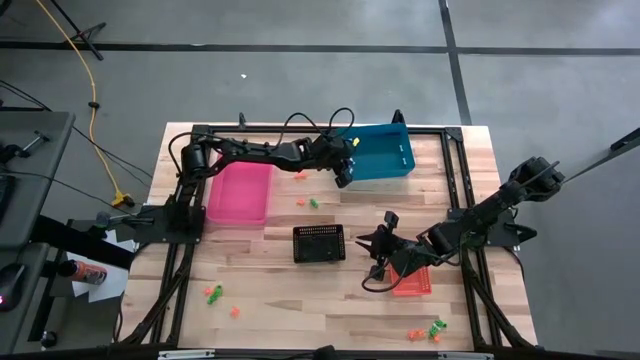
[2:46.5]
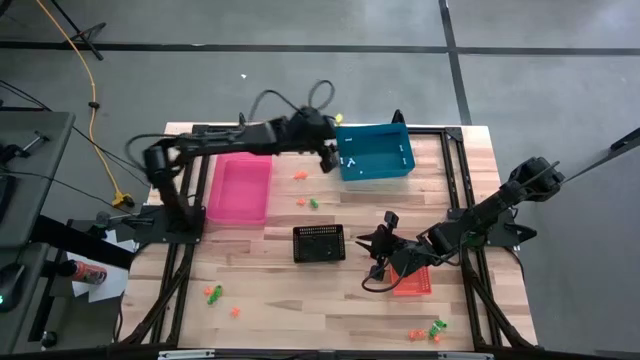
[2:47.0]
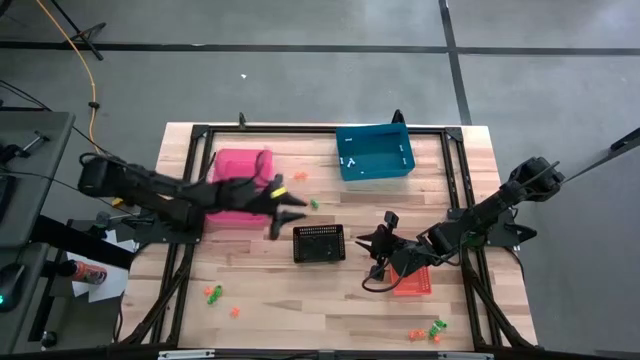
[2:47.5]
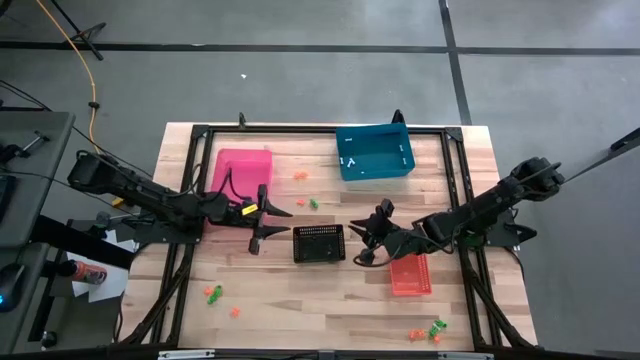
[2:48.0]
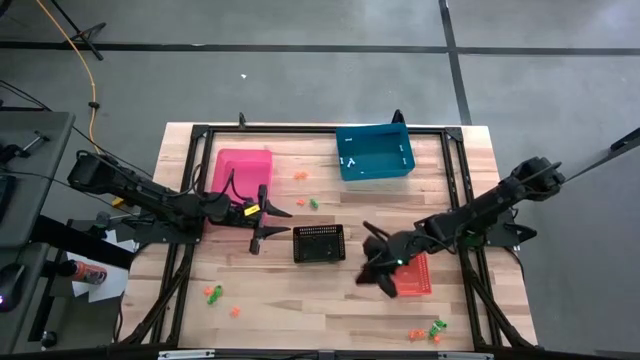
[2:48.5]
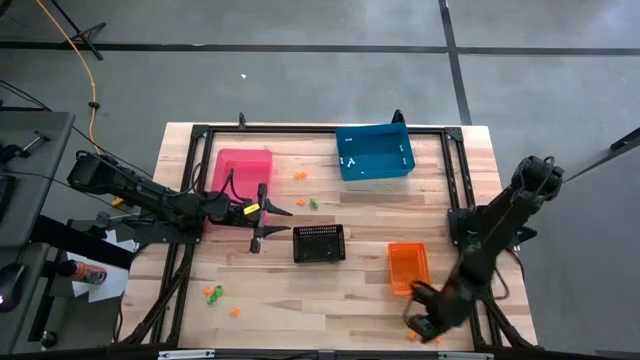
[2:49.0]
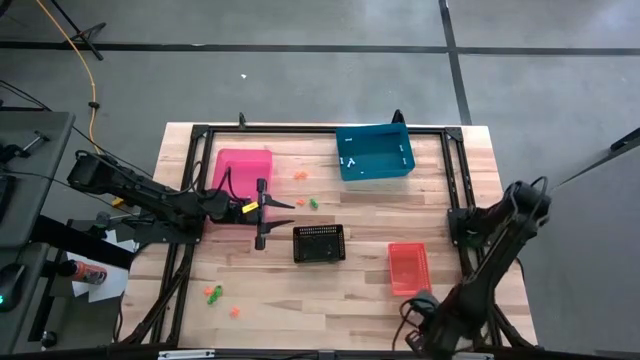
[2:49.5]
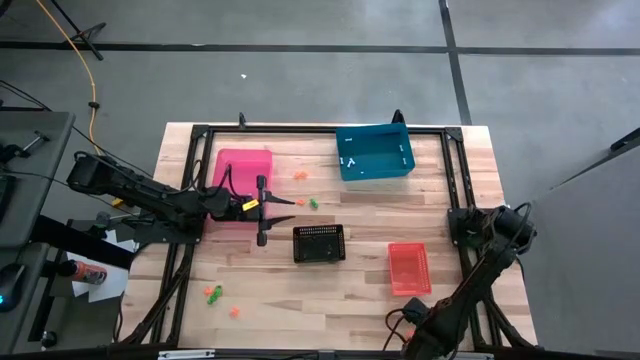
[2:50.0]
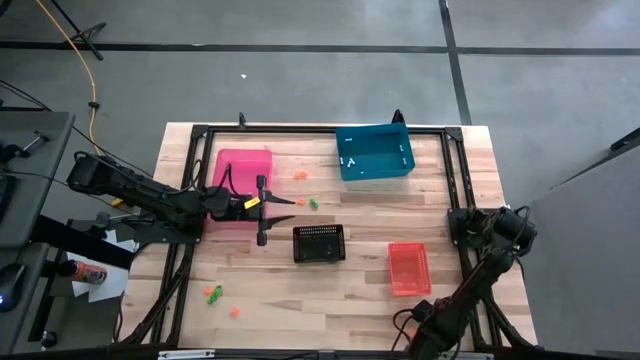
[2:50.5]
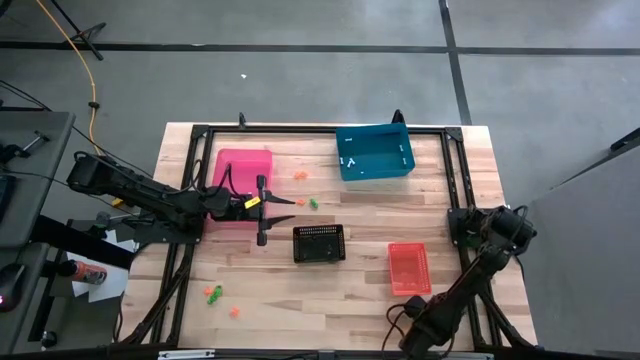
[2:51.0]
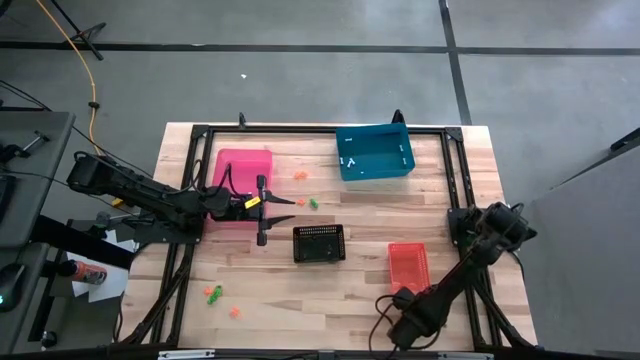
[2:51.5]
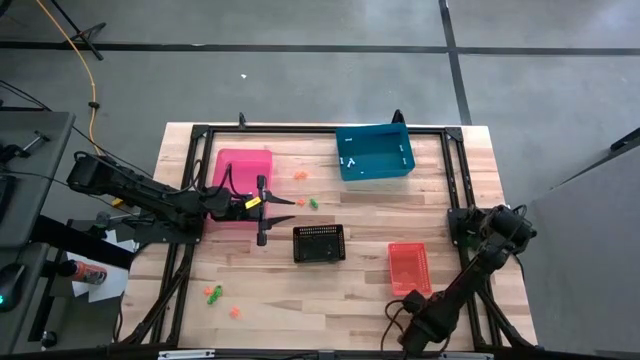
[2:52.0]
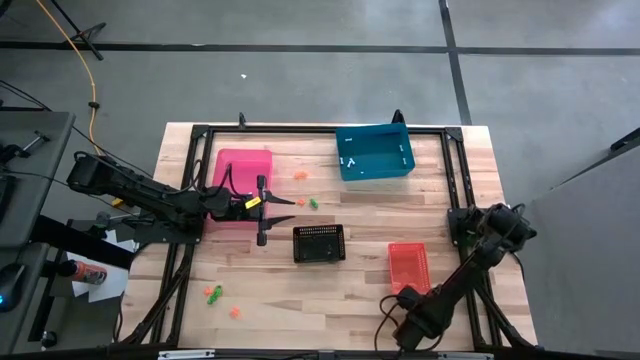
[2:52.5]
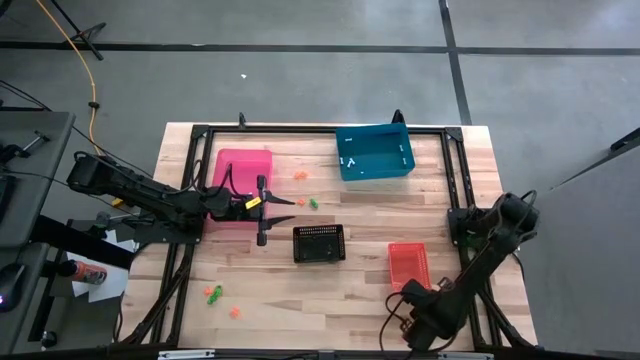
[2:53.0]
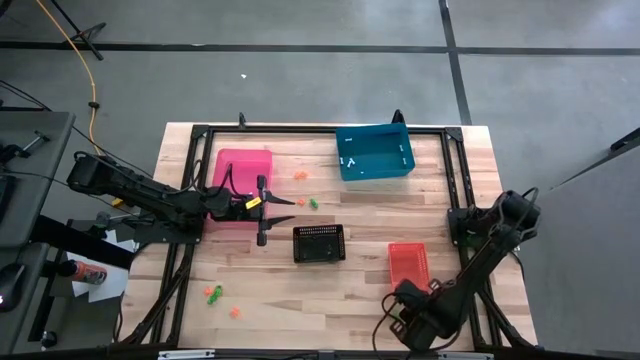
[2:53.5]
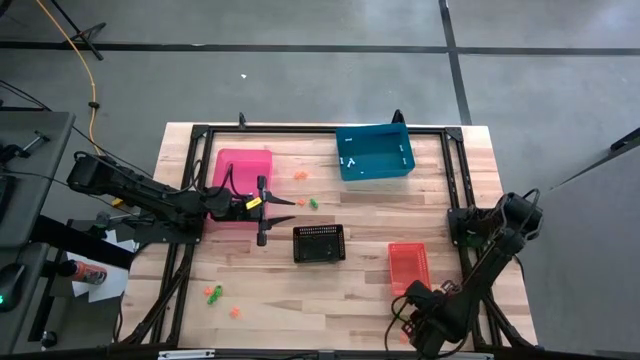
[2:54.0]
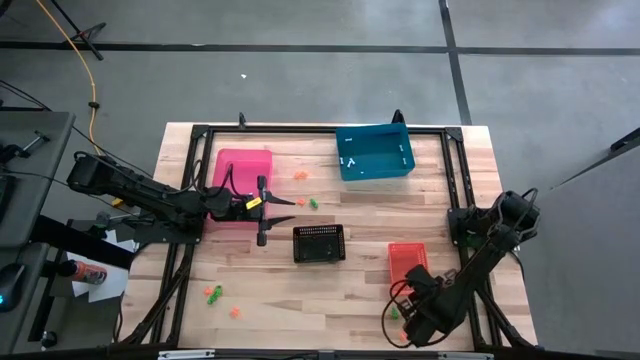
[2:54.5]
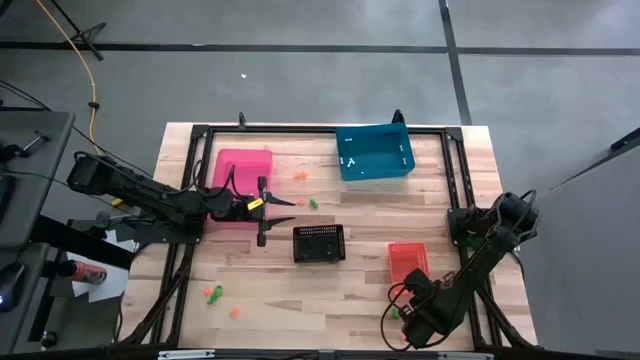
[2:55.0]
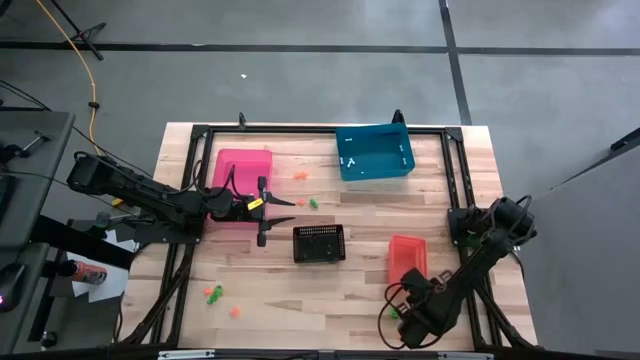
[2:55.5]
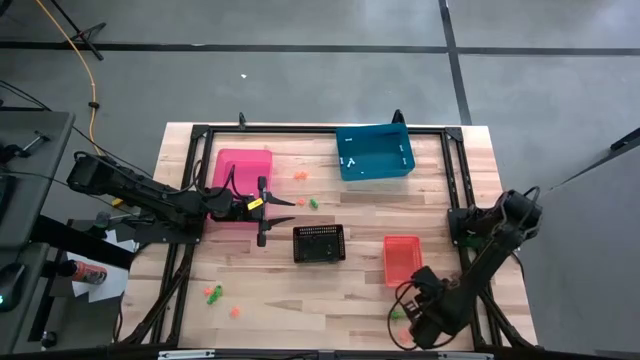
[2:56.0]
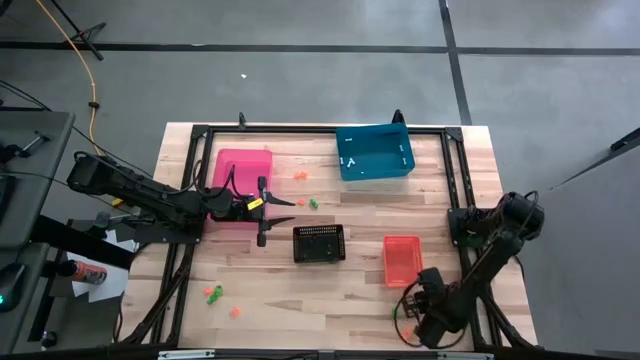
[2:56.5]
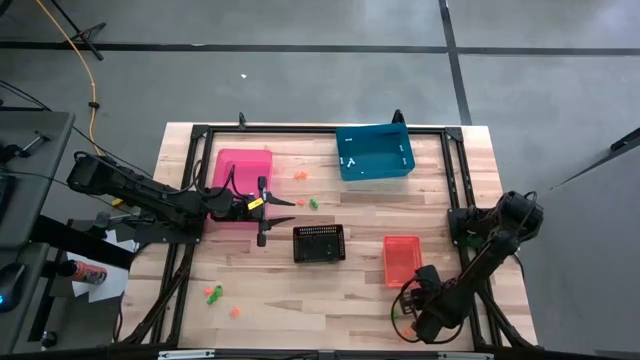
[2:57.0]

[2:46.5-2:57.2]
Task: Sort Halloween decoration
Put the white bone toy into the blue bin

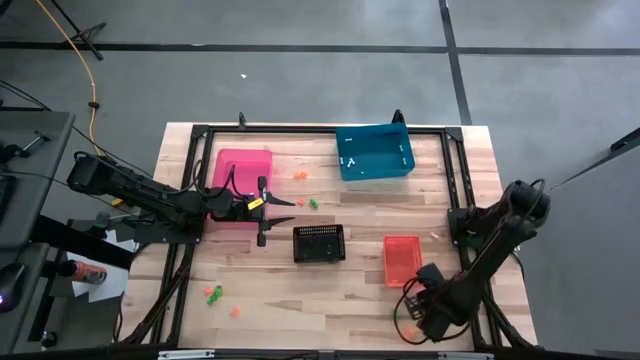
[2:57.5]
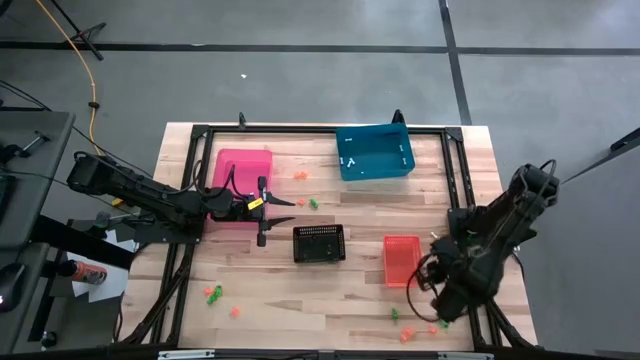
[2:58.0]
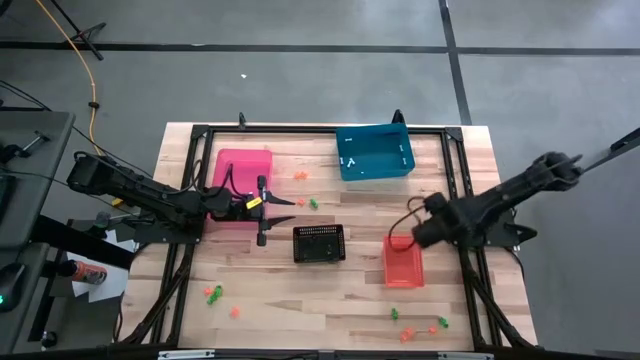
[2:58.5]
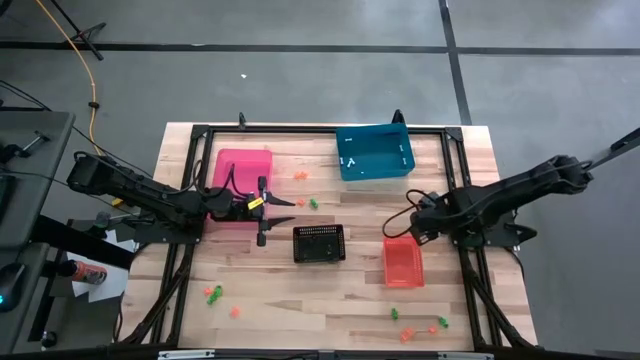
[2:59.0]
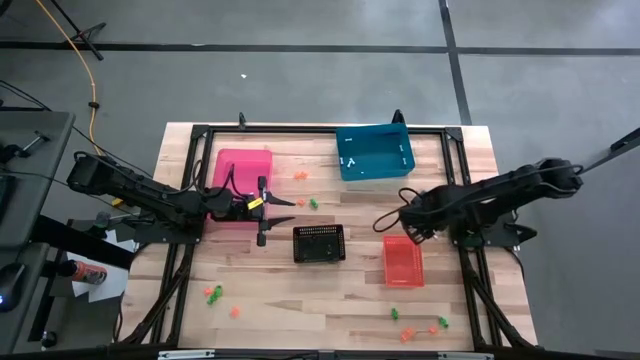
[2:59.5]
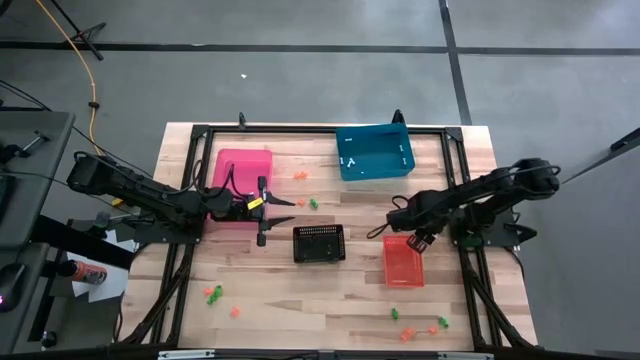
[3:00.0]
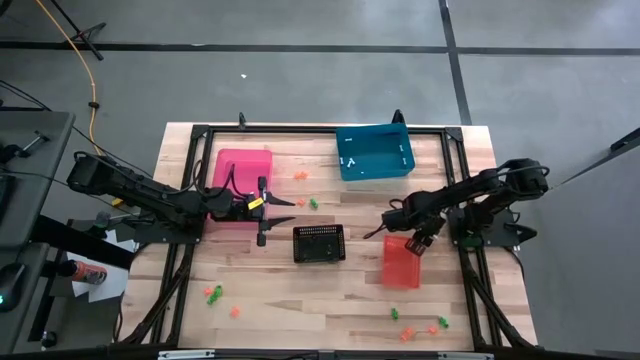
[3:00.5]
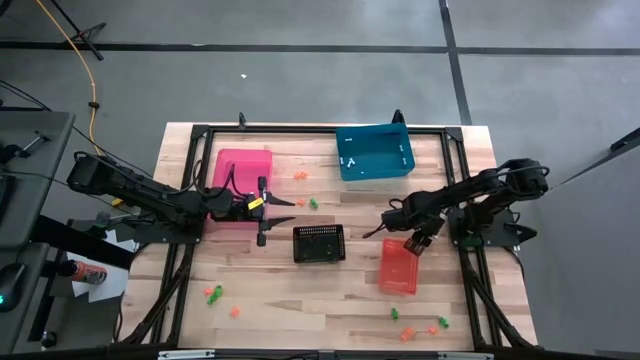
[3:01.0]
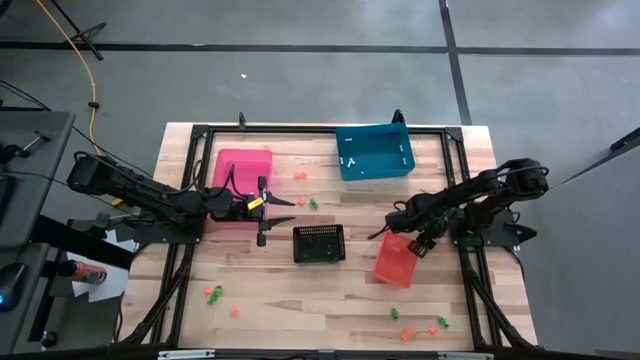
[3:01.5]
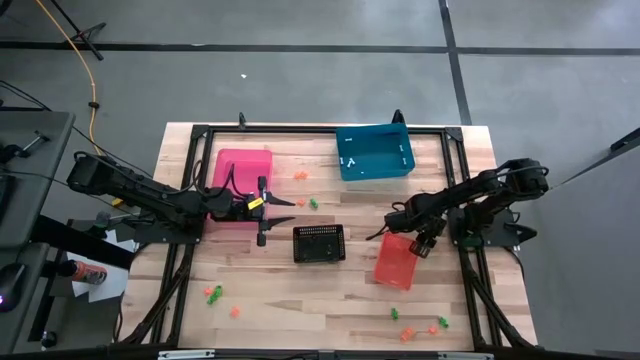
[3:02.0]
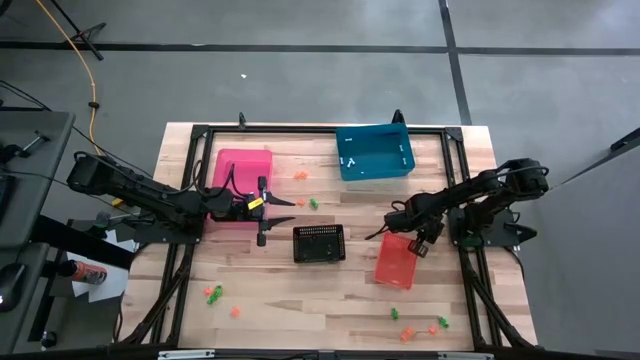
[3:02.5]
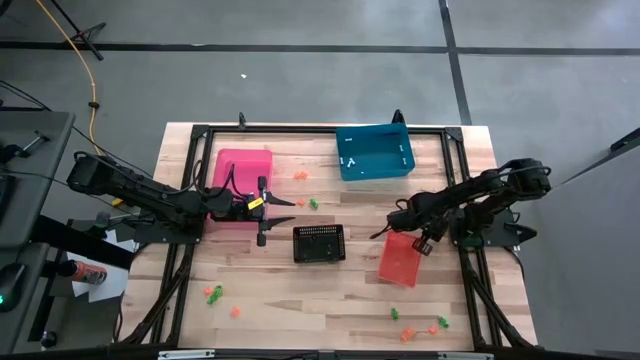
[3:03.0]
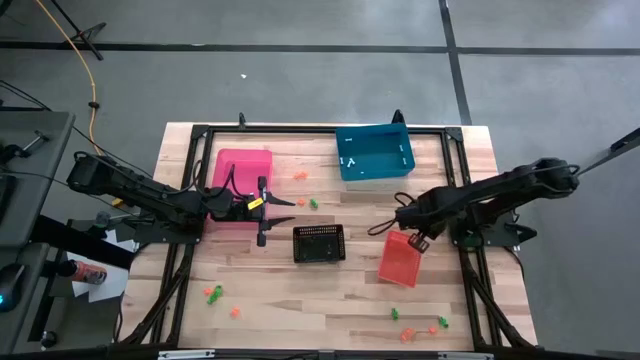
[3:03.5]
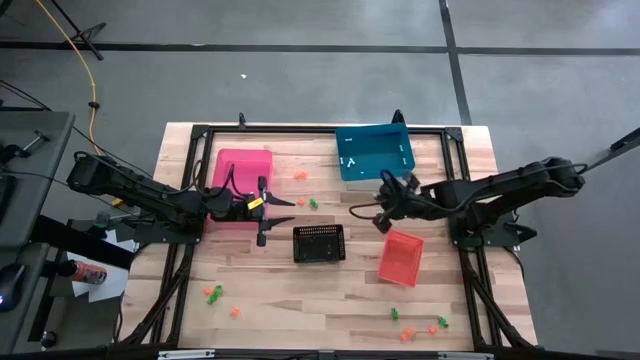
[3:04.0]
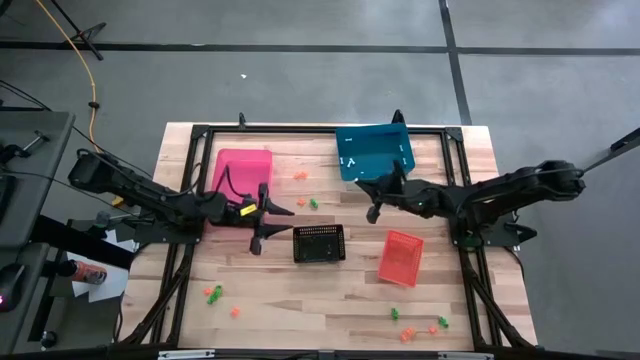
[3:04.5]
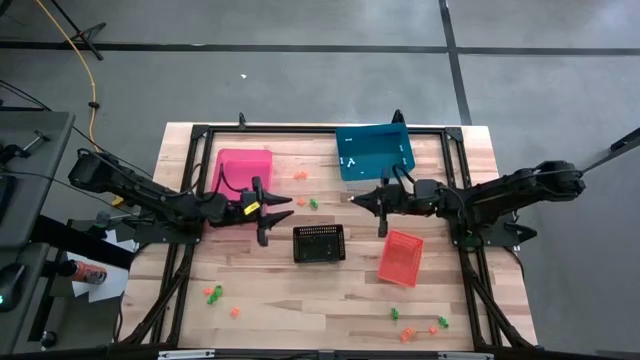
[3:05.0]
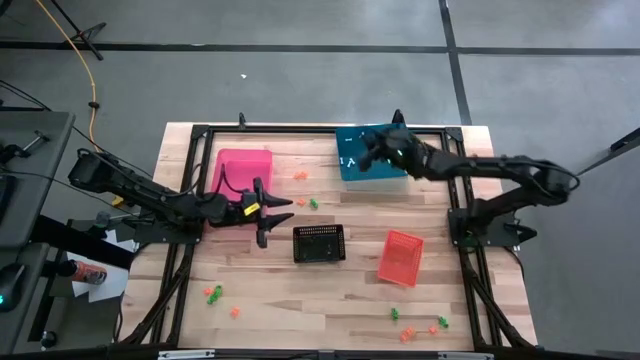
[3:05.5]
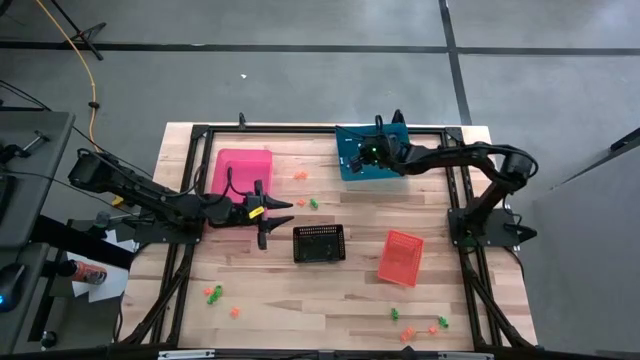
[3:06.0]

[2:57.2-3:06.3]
Put the white bone toy into the blue bin

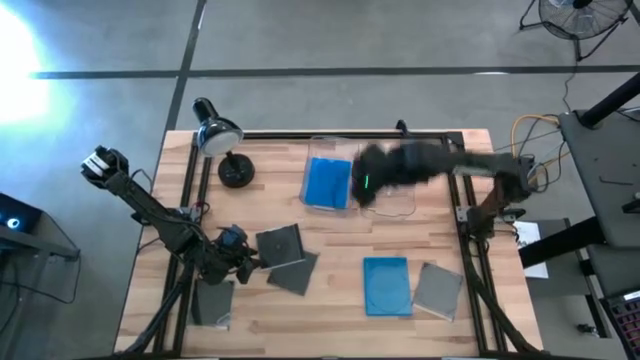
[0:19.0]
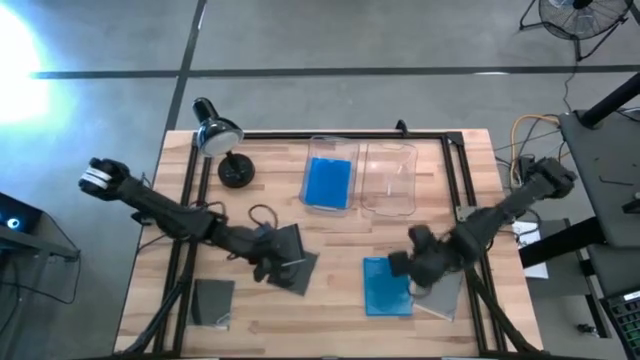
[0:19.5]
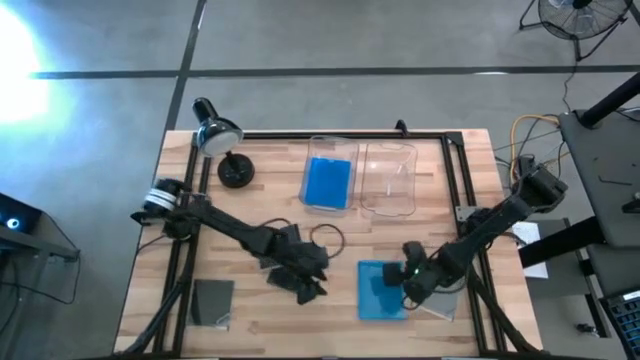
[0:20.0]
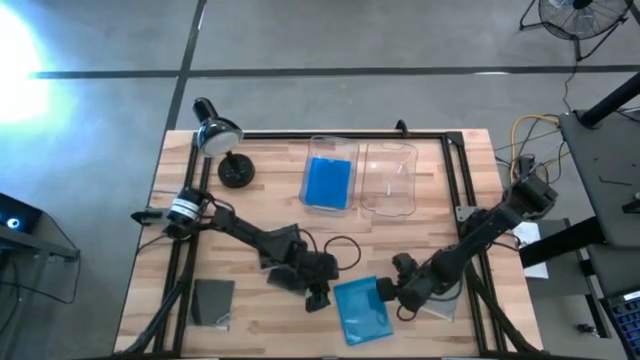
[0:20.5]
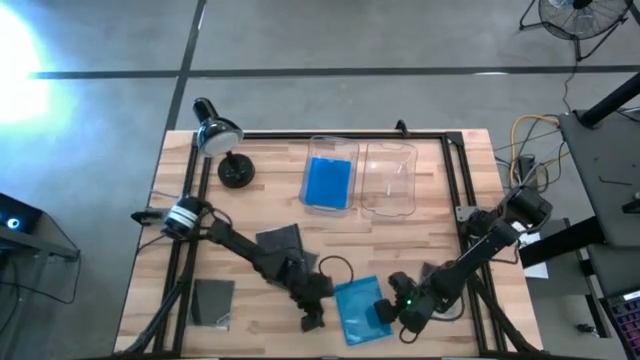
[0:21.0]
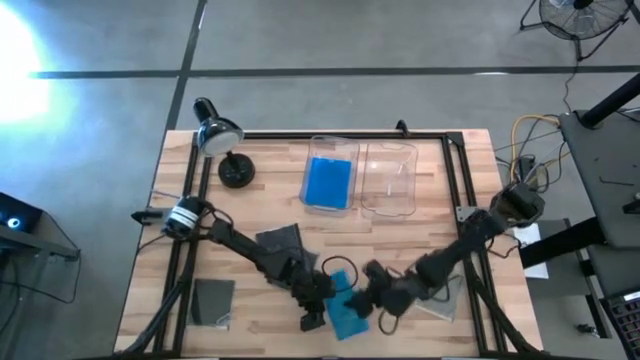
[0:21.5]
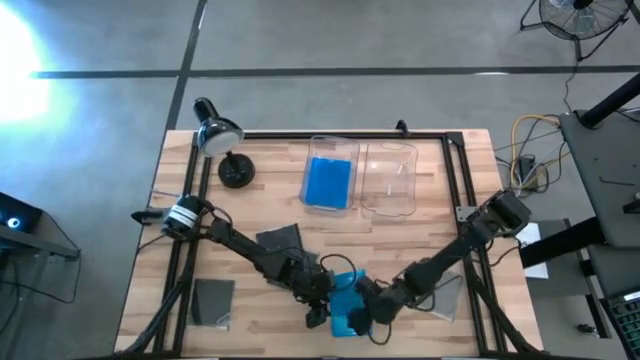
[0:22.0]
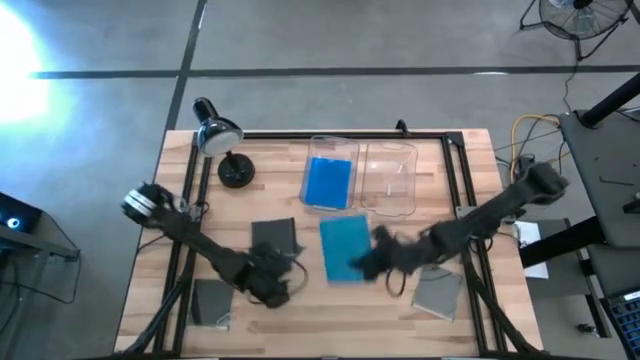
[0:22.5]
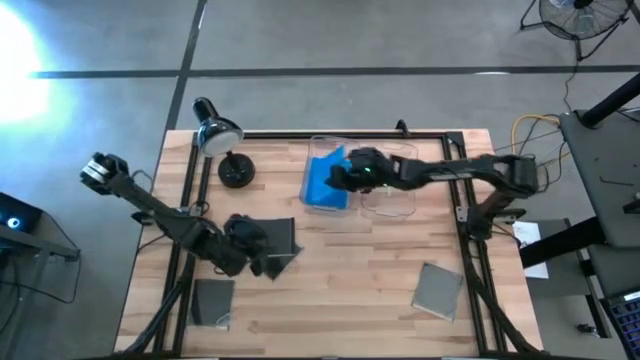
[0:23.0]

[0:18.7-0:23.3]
Task: Pick & place jewel cases by type
Put the blue CD case into the left transparent bin
